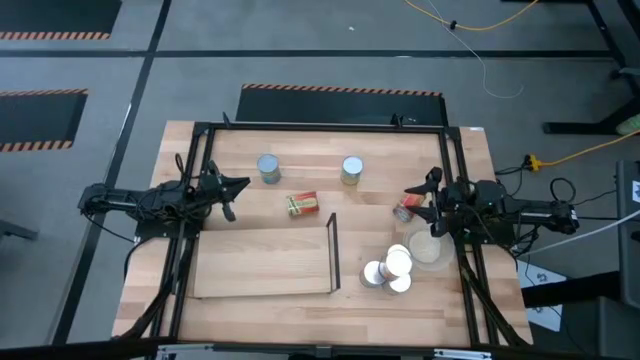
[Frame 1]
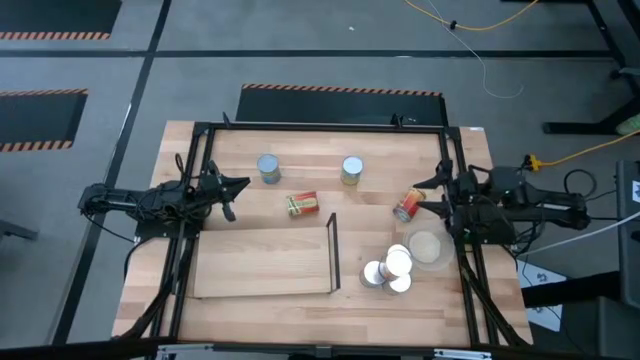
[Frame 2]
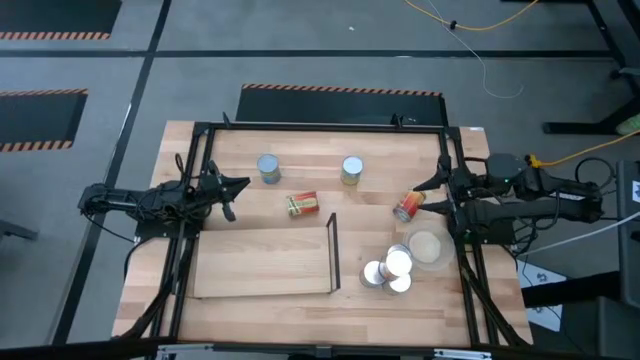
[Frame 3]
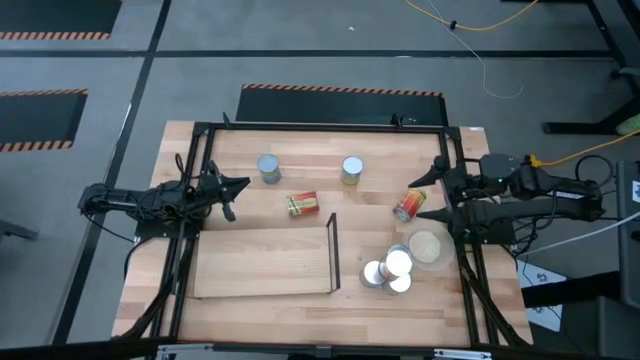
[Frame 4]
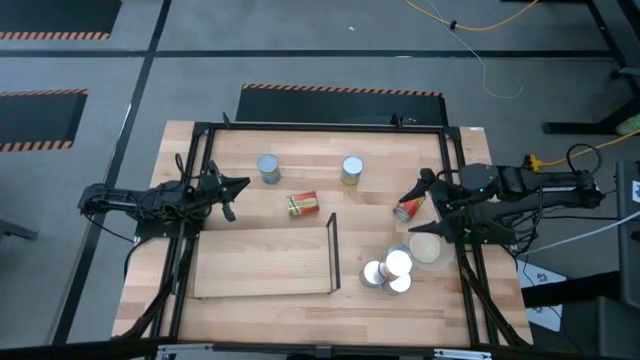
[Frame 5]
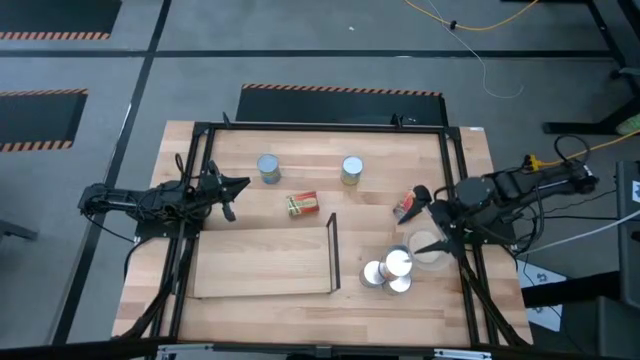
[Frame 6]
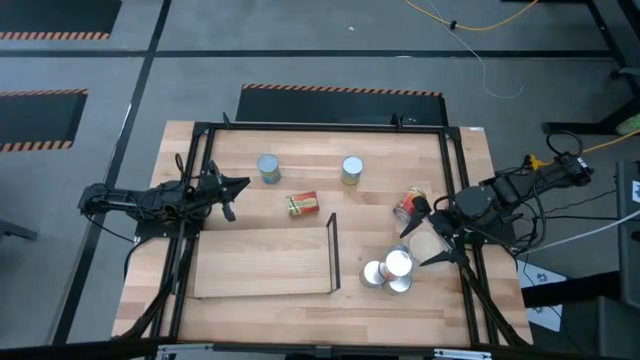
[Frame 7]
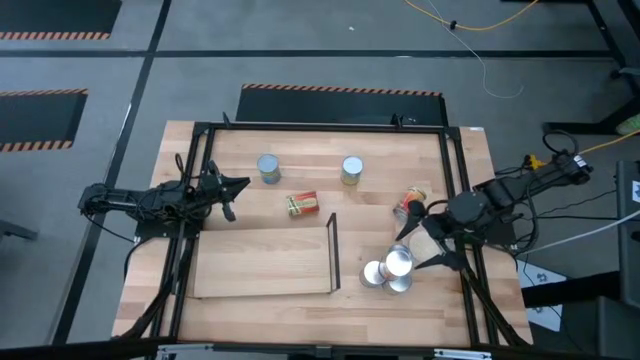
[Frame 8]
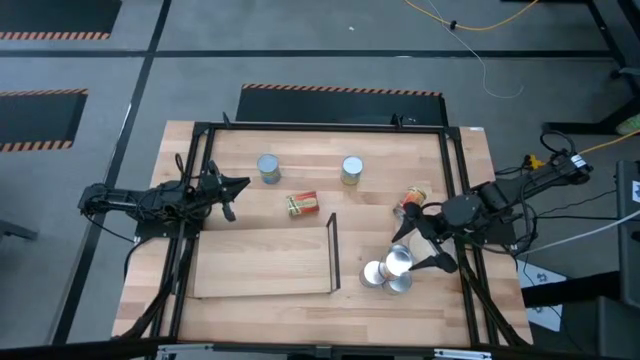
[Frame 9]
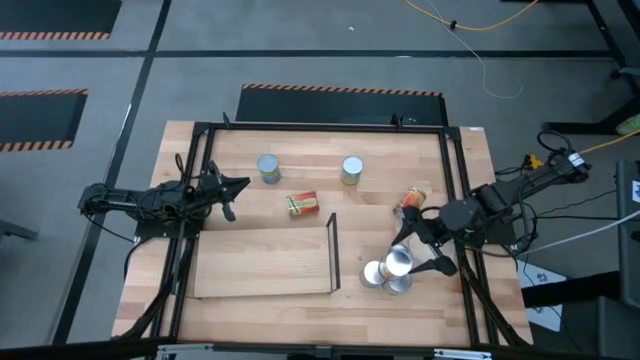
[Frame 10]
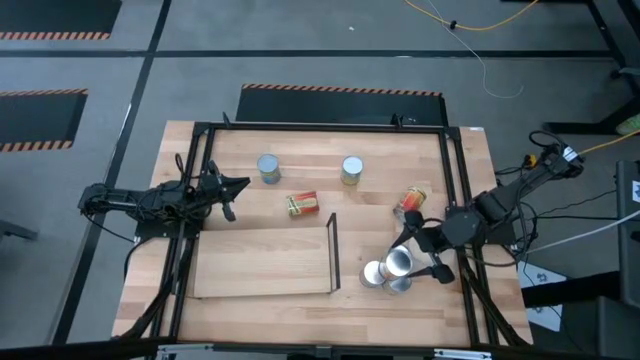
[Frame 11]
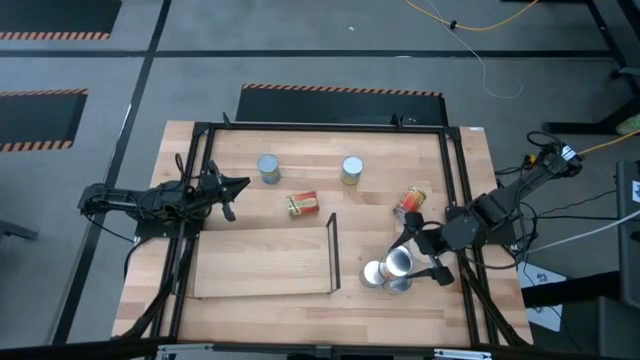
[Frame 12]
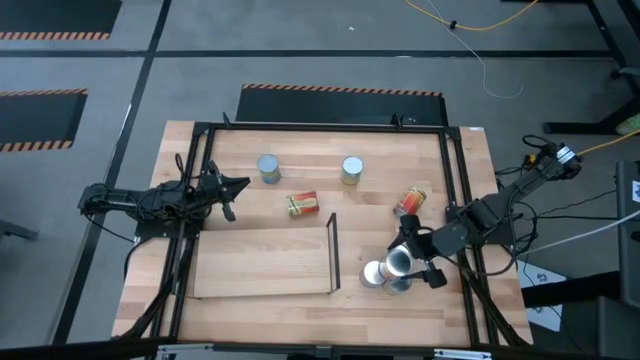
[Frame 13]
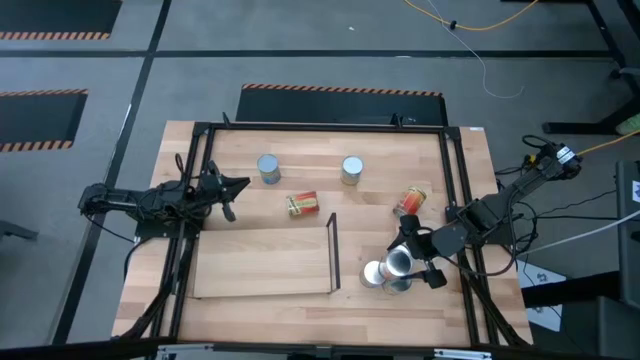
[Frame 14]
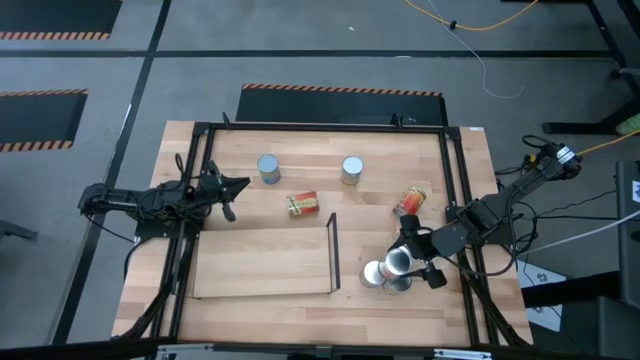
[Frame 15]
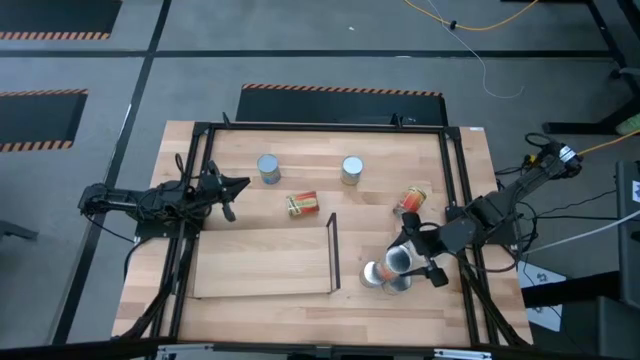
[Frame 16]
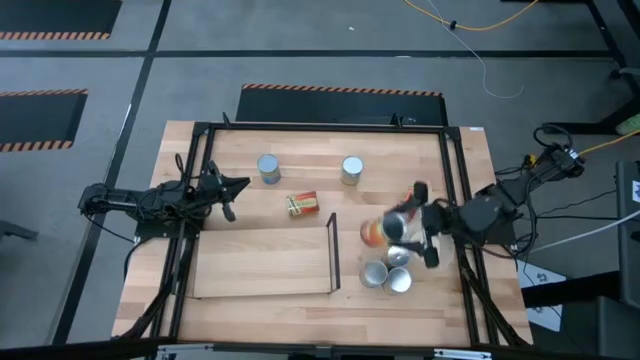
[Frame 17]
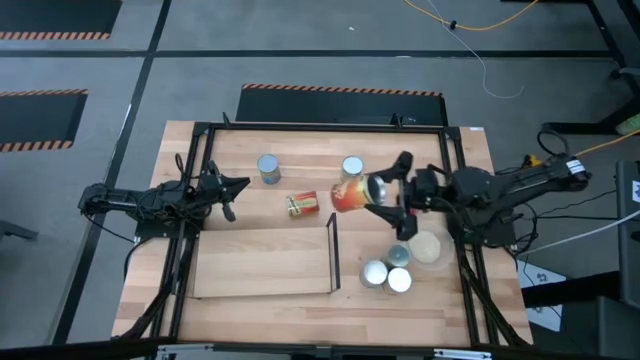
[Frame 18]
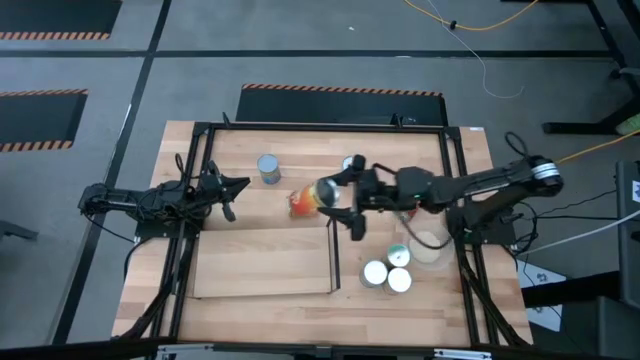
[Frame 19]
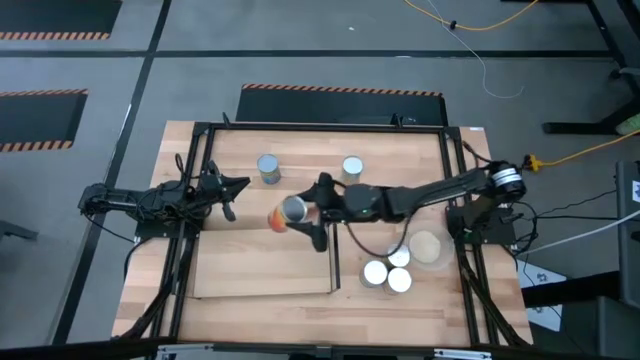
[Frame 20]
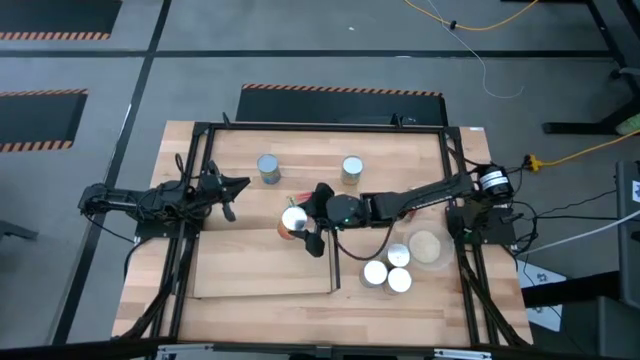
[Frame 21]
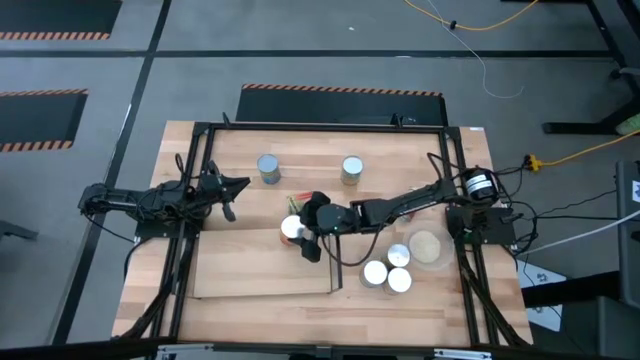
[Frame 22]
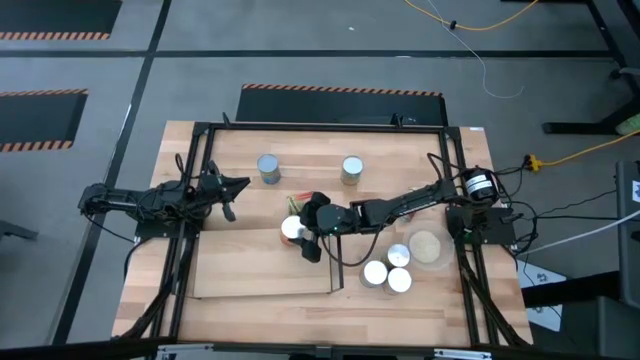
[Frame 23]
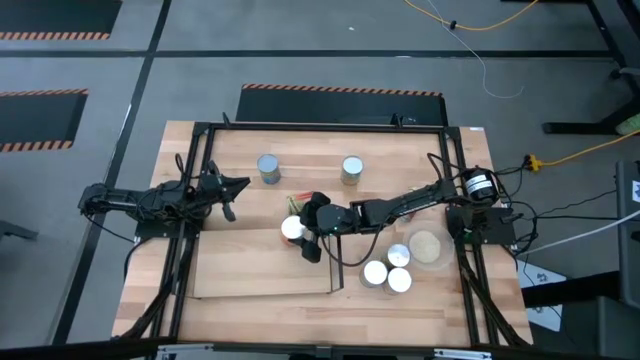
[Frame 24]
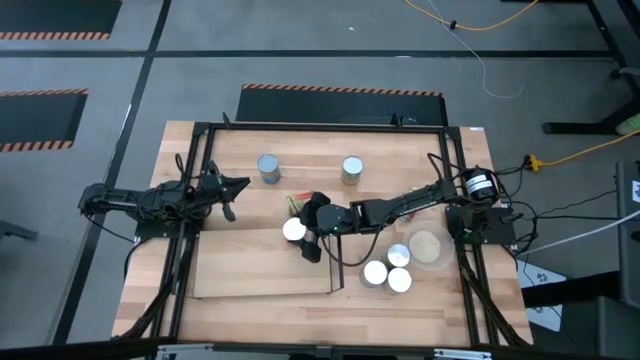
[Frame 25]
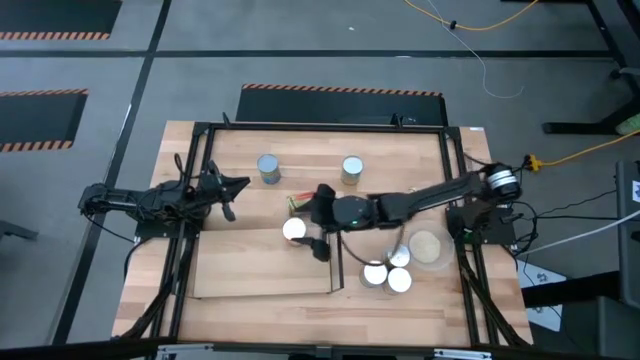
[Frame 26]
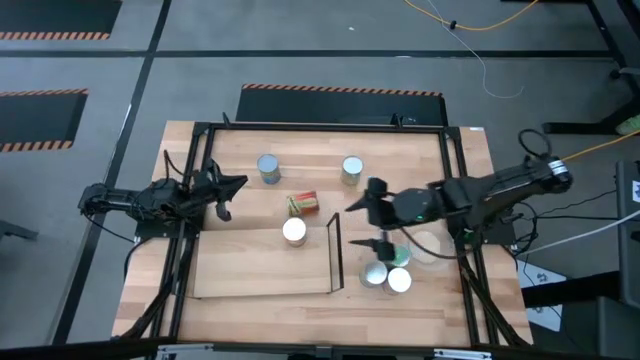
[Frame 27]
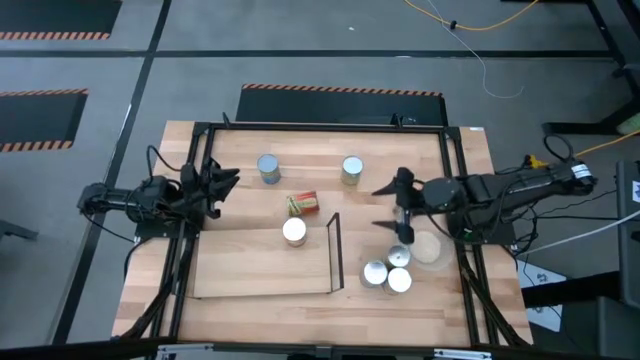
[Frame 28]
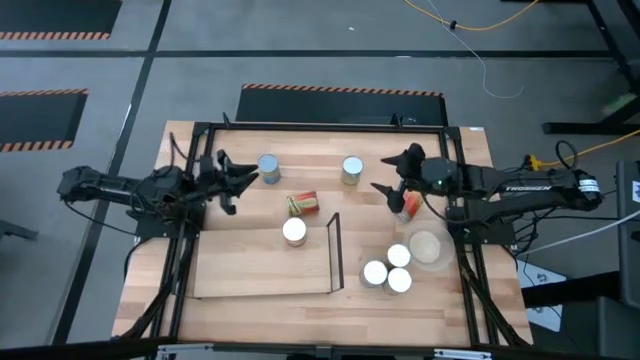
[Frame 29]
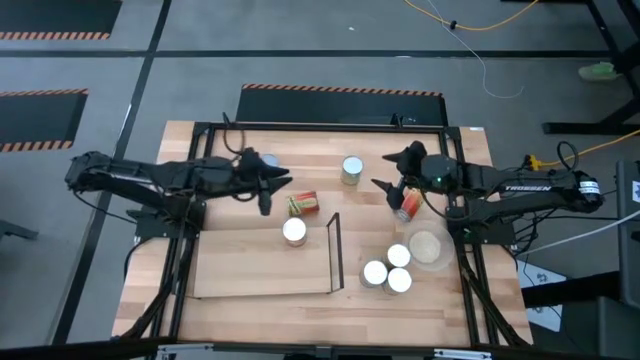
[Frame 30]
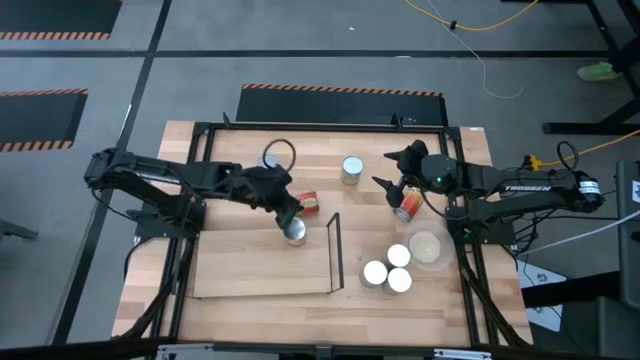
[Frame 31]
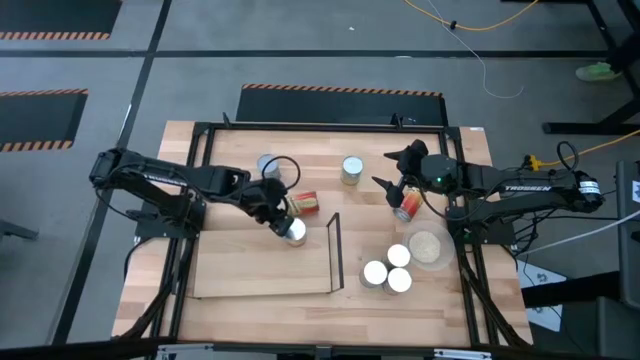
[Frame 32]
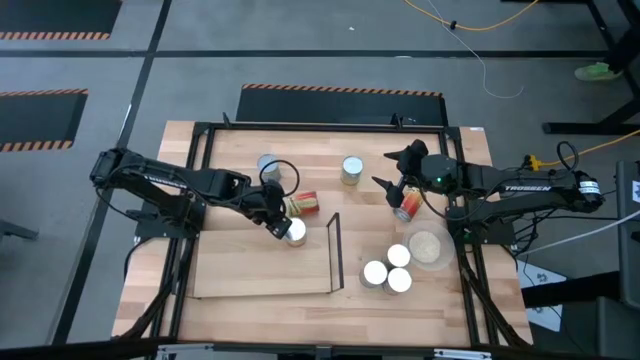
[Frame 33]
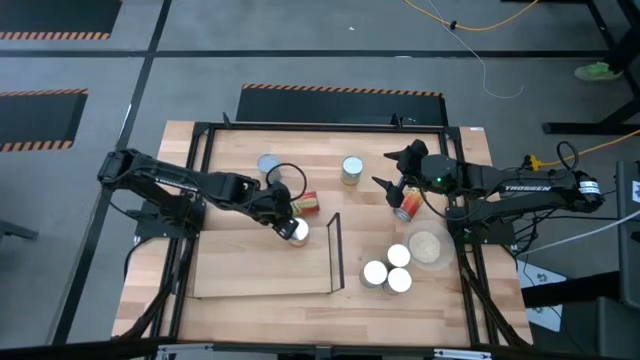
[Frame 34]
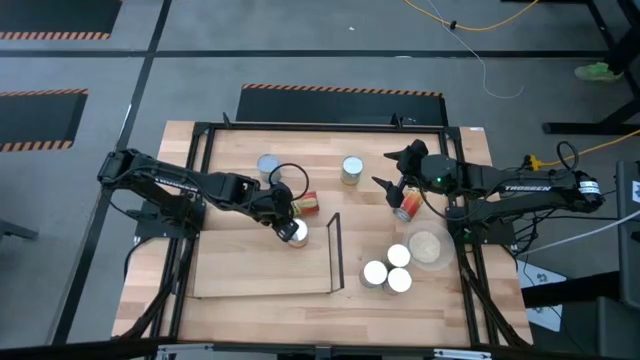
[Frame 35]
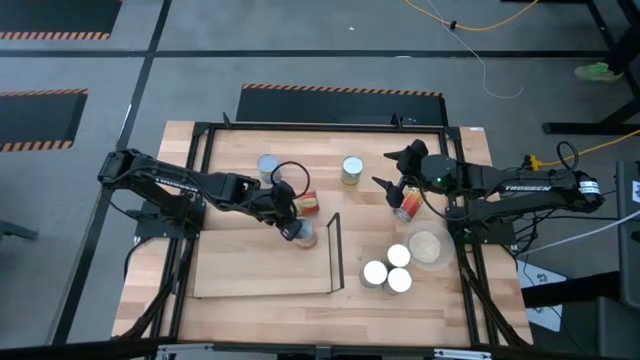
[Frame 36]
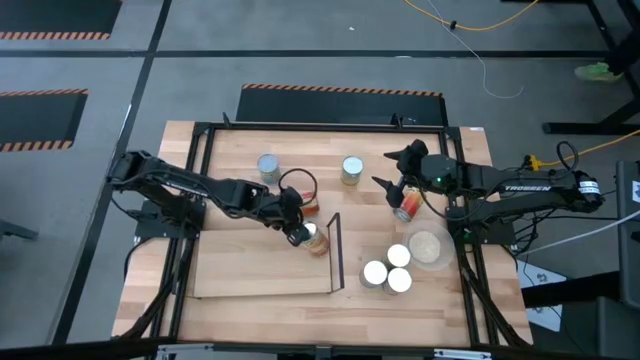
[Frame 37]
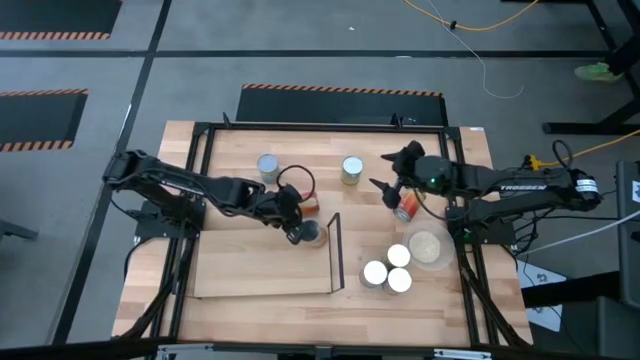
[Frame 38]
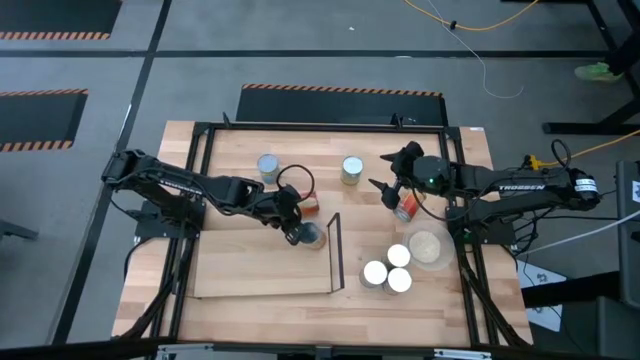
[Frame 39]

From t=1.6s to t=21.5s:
Task: Pick and place cans onto a shelf
Put the corn can on the shelf
